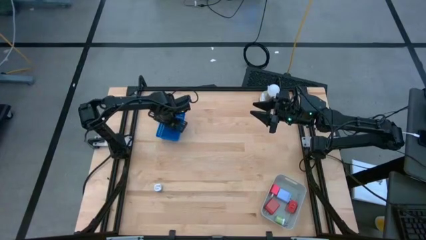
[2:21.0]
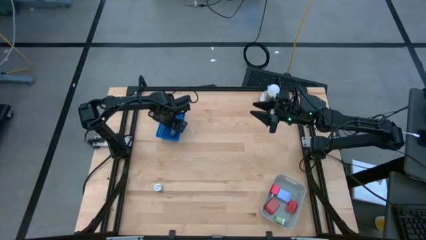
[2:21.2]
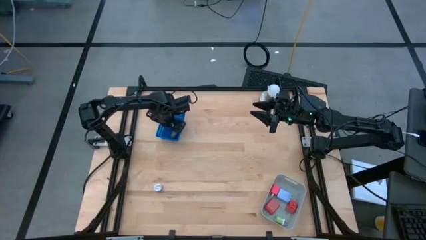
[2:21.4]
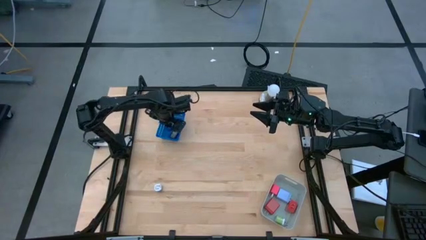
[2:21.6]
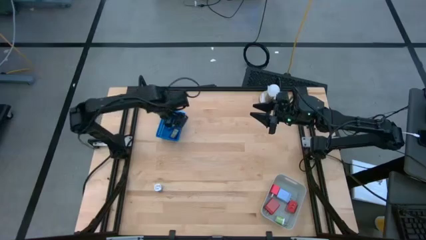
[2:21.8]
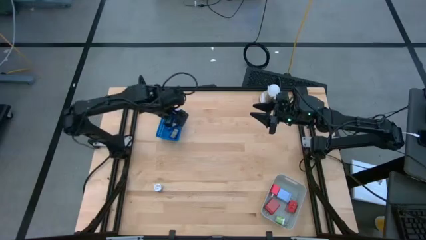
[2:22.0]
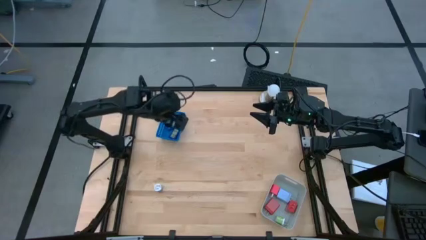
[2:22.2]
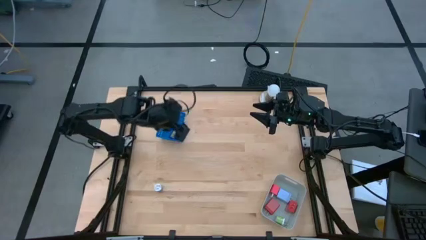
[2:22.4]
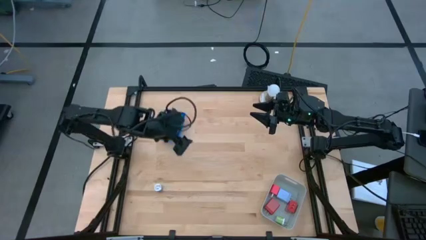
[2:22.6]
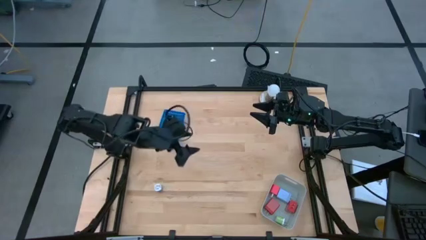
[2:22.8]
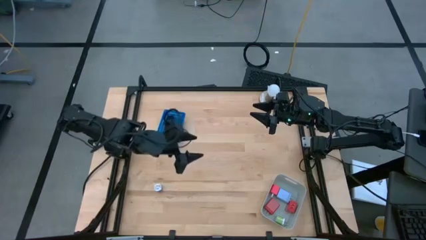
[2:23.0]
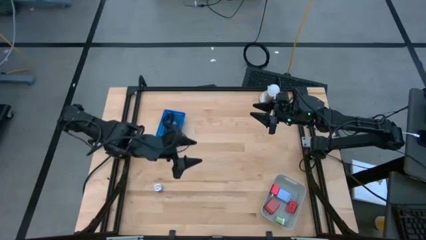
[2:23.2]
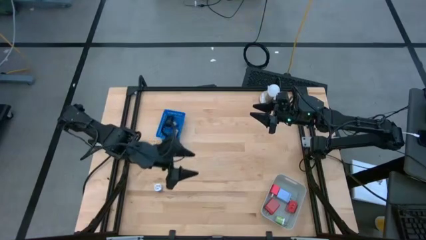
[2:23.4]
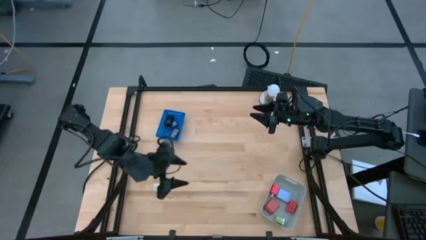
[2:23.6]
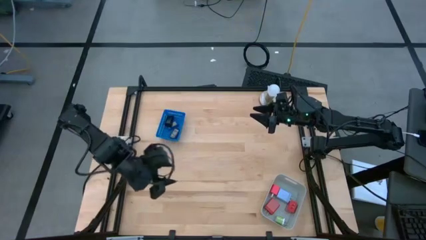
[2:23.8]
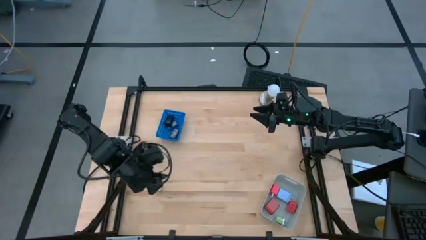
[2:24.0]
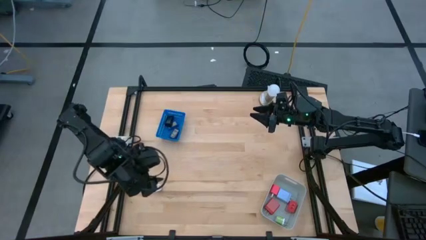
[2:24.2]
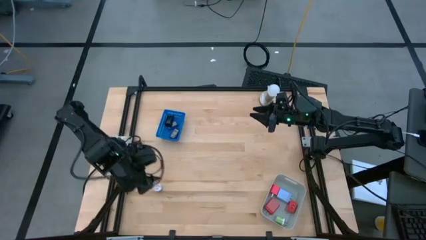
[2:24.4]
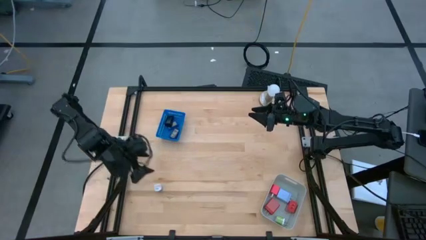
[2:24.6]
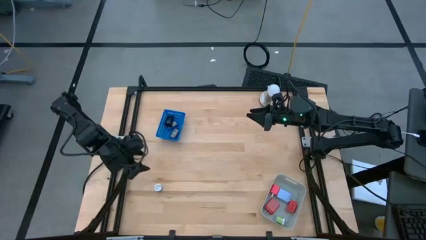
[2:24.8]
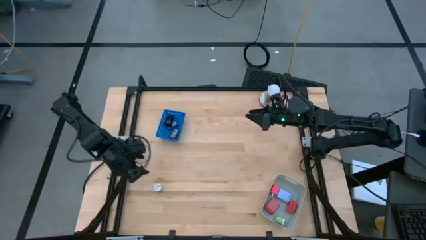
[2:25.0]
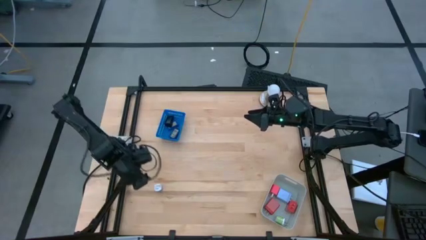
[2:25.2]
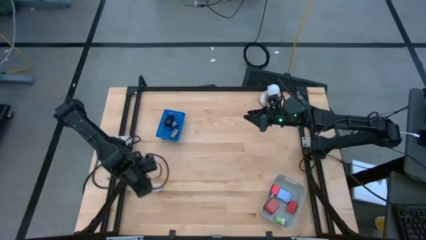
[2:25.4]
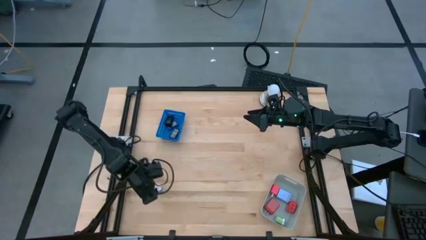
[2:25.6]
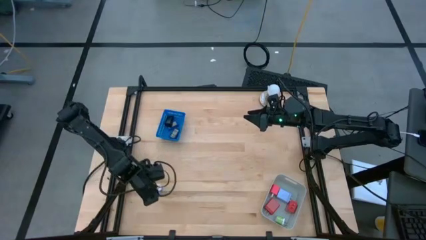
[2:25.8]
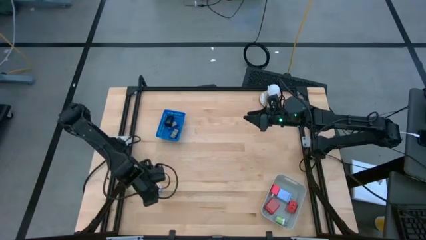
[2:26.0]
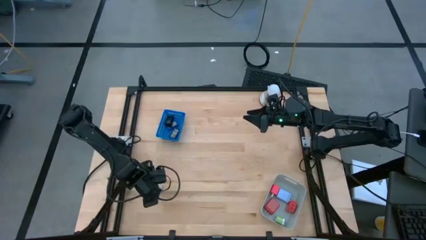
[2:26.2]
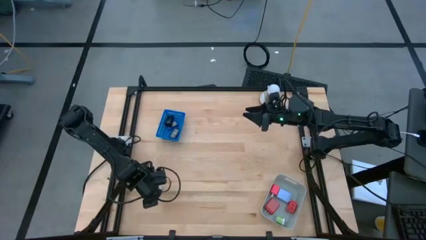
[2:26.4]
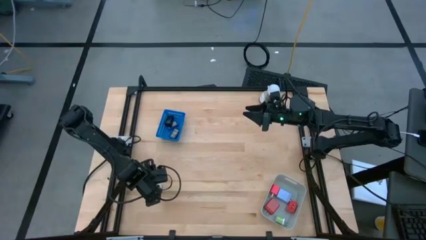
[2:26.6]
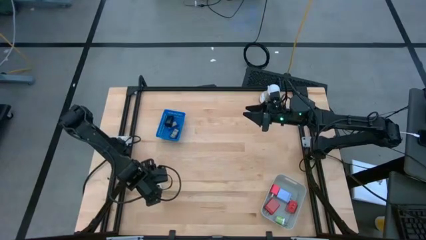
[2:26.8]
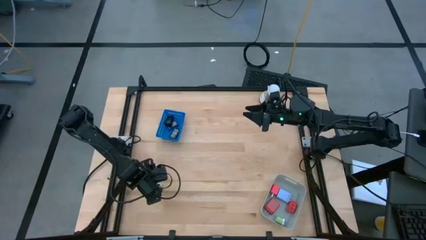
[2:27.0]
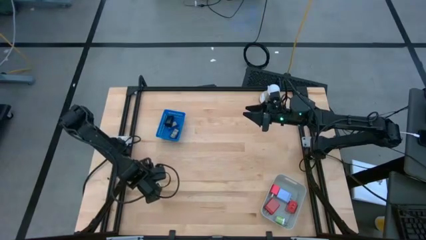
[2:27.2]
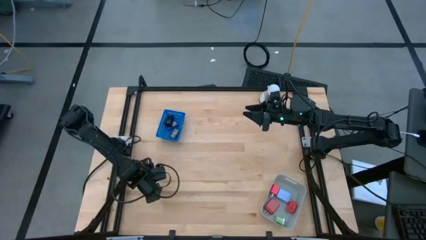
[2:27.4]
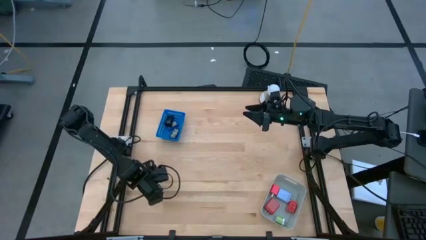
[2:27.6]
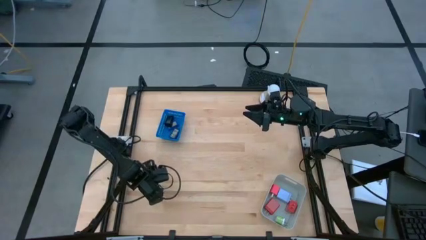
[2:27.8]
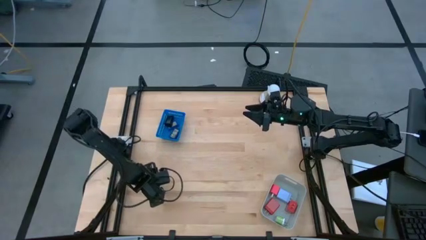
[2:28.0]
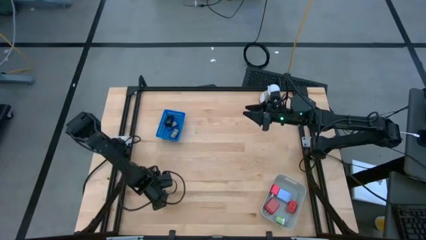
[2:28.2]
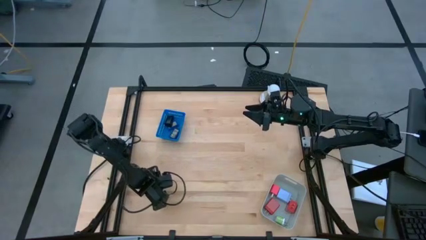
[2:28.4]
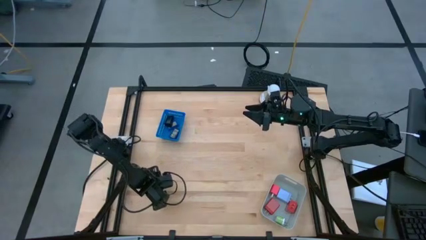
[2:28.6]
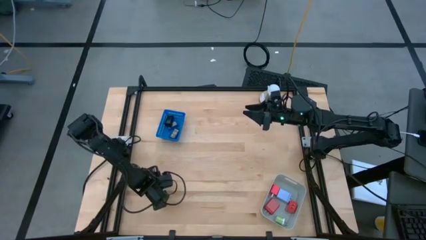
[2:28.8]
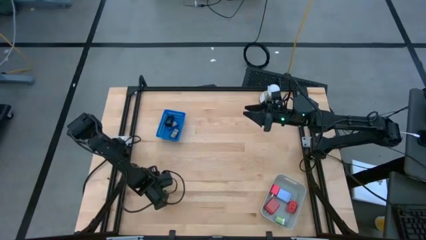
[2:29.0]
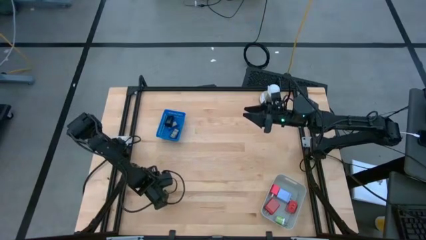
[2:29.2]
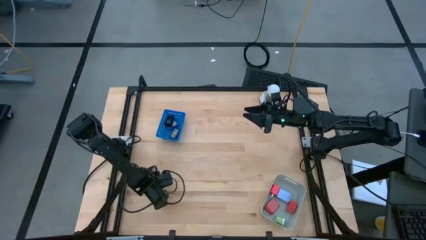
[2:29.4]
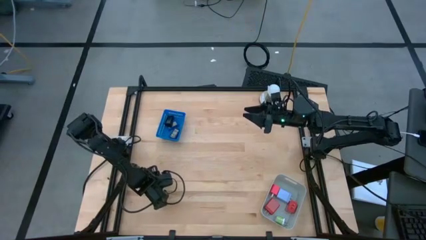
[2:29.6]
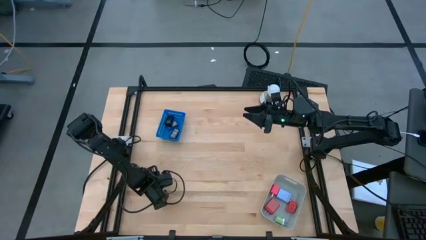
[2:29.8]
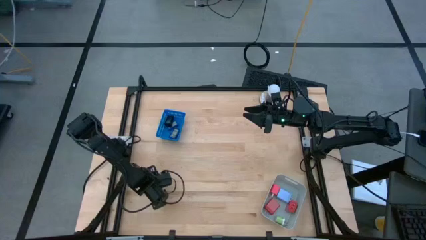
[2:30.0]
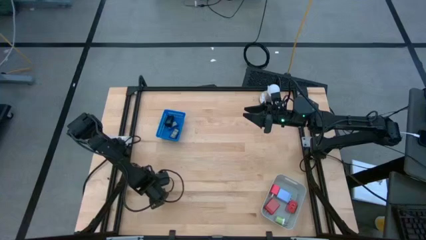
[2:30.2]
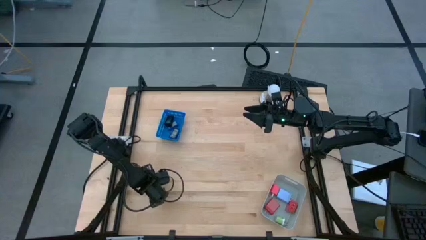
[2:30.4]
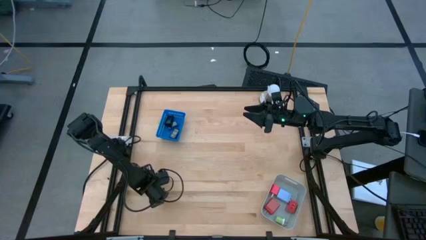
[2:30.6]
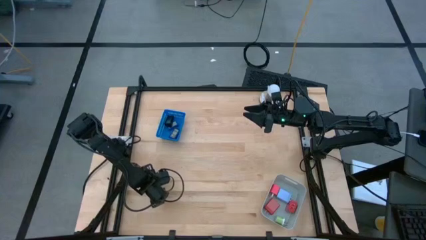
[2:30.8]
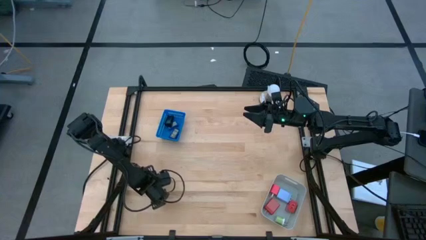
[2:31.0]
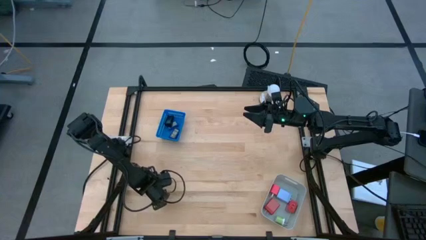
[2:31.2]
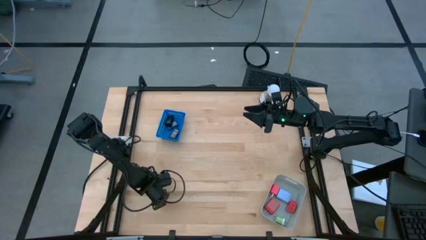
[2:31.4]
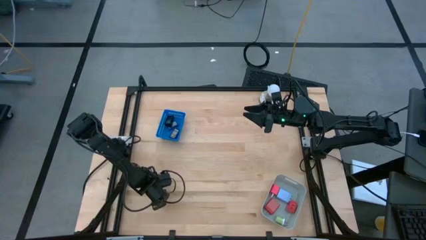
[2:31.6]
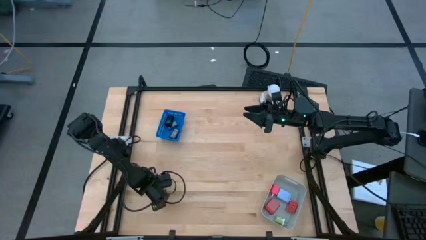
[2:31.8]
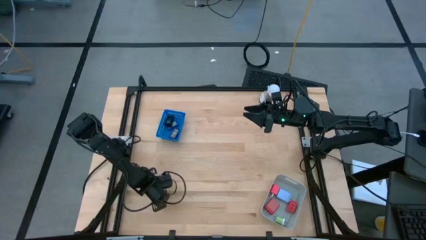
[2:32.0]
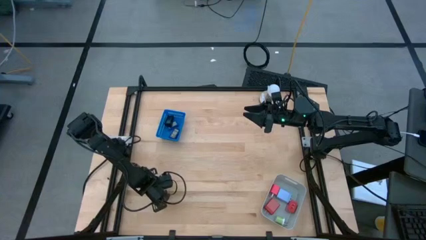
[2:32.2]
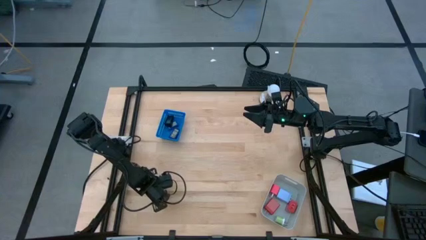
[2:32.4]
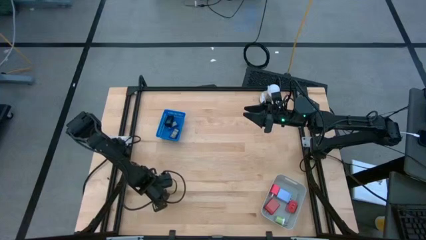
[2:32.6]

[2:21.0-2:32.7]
Task: Pick & Place Office items
Put the violet charger adapter into the white bin
